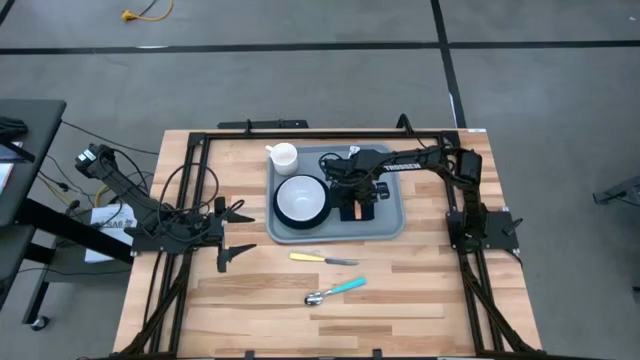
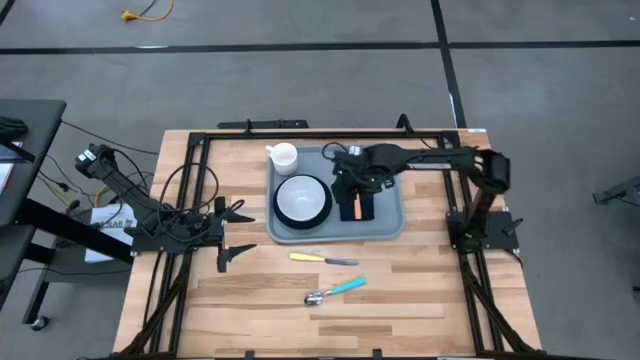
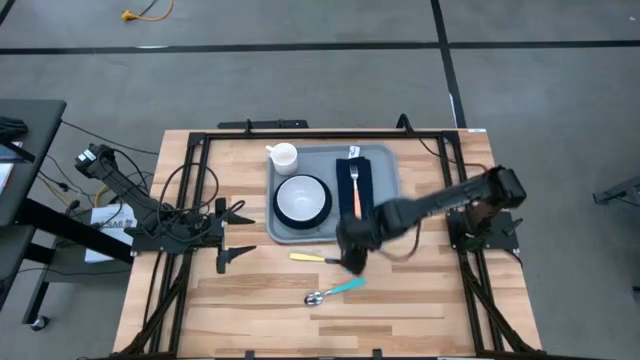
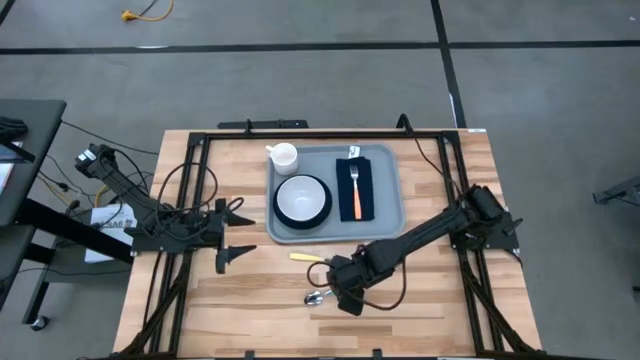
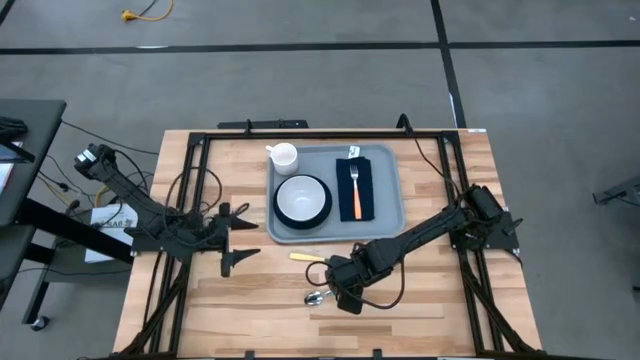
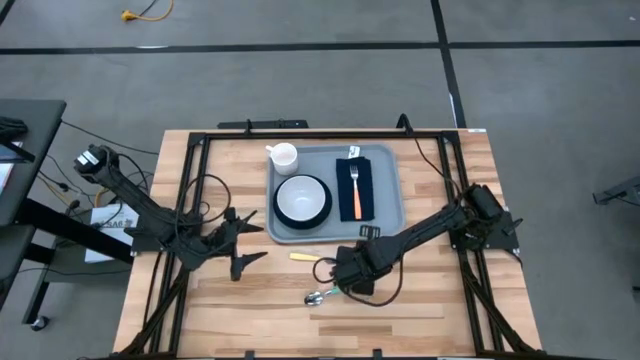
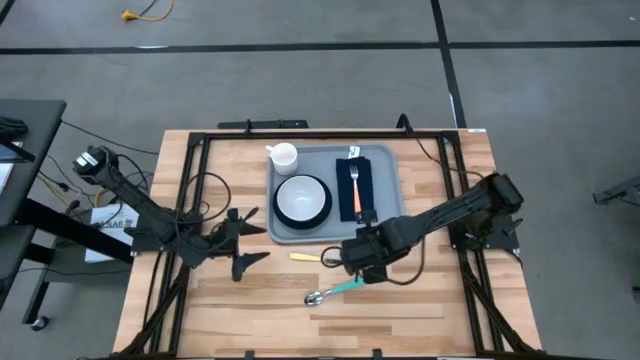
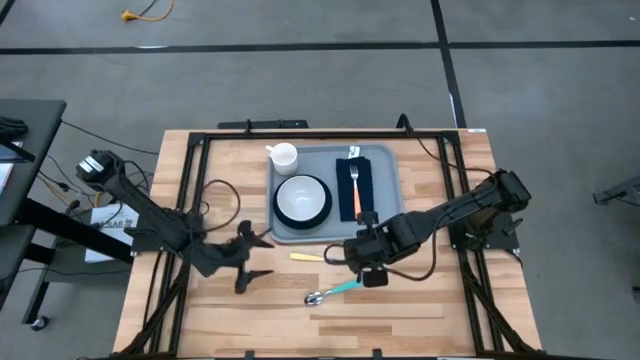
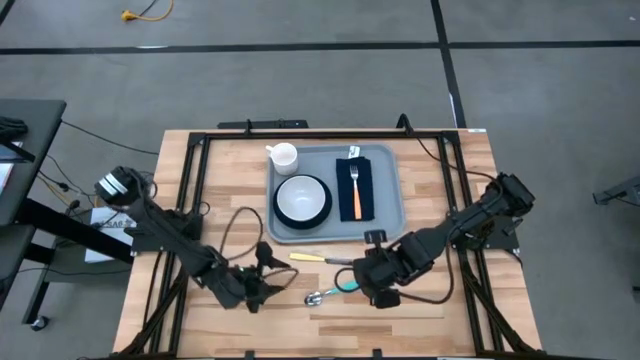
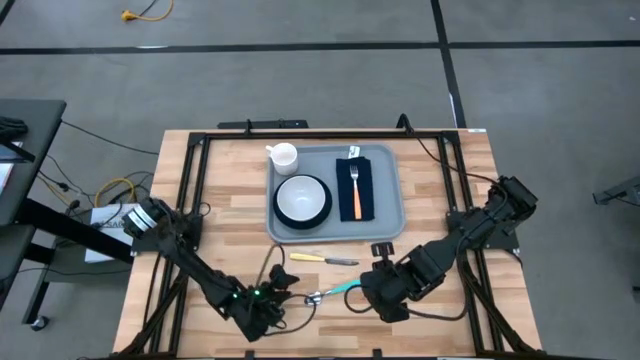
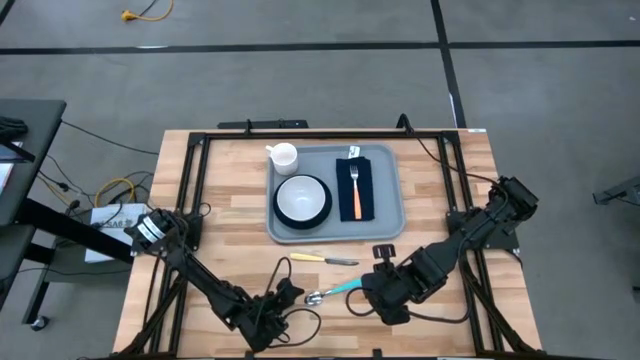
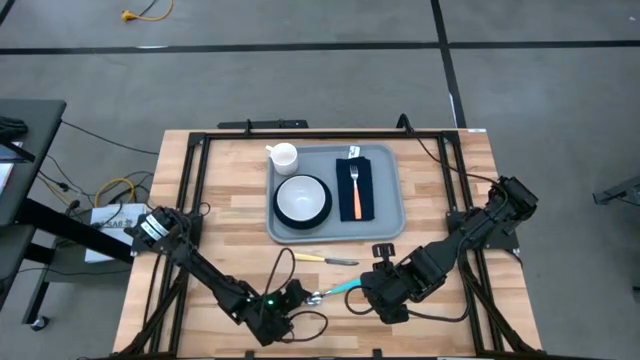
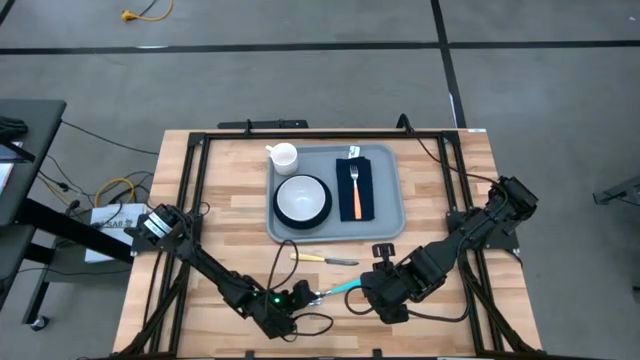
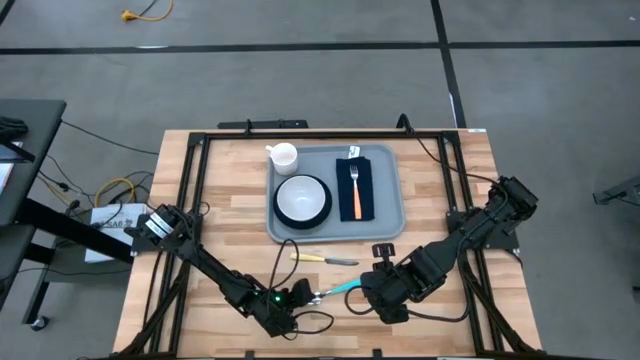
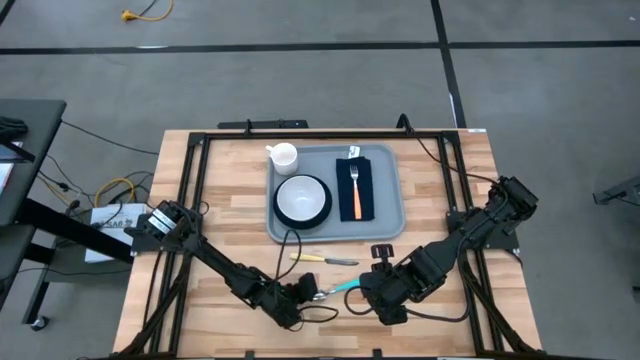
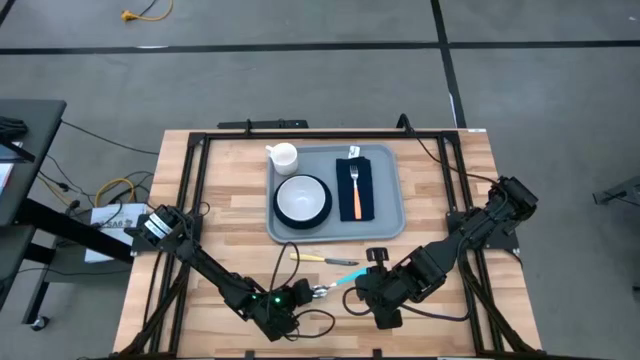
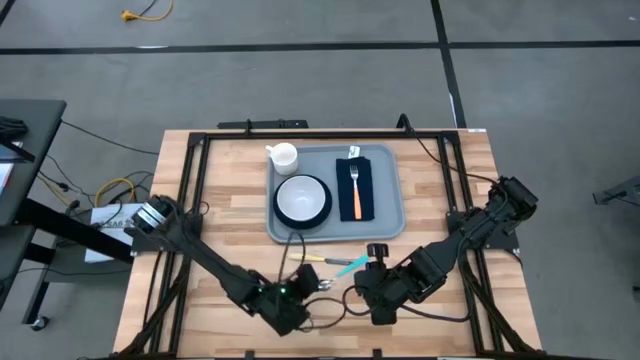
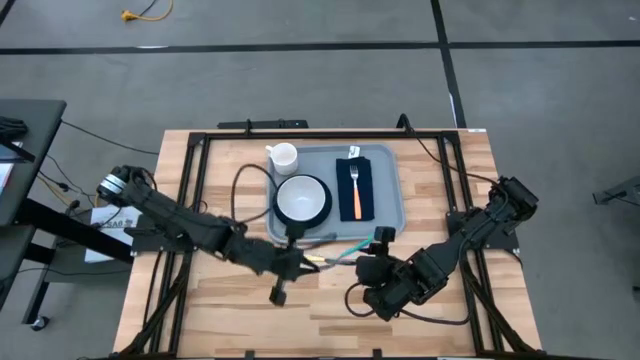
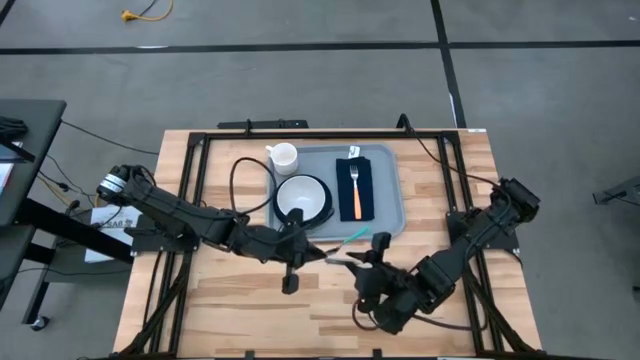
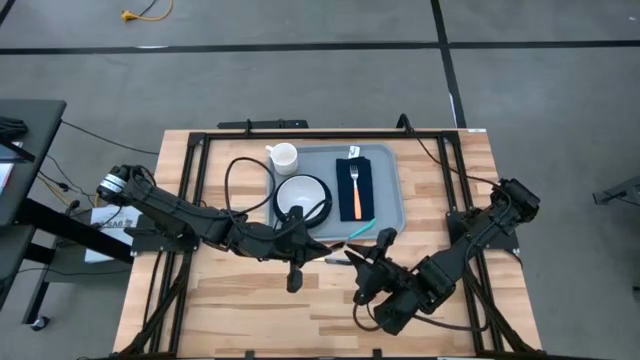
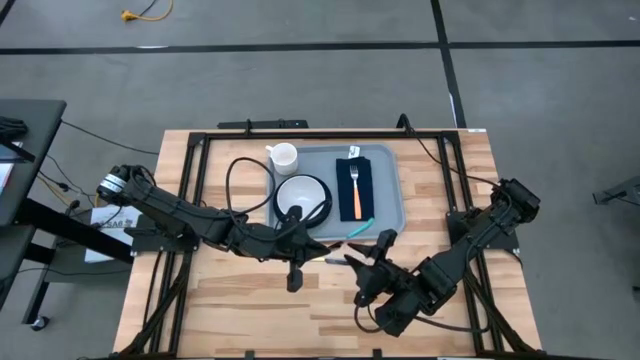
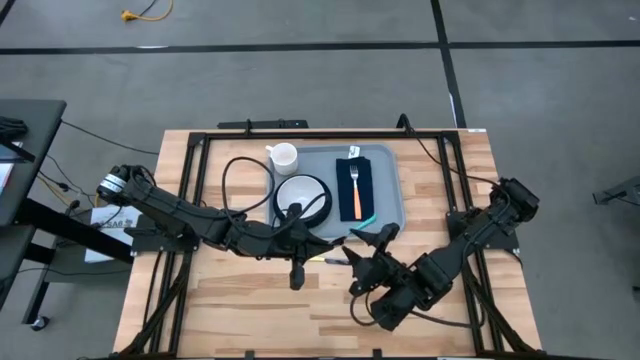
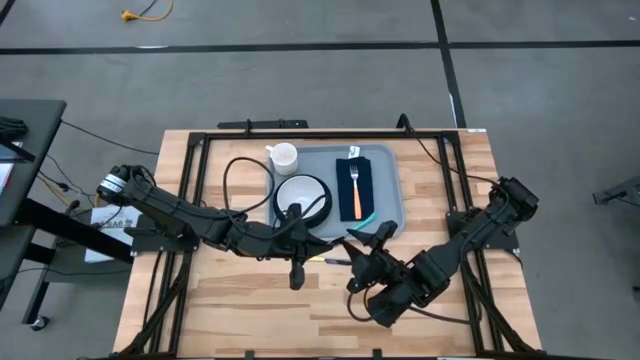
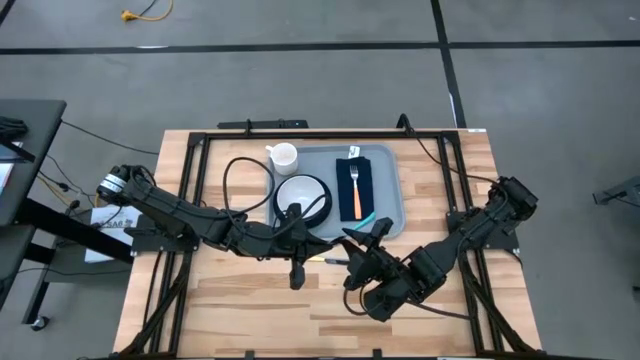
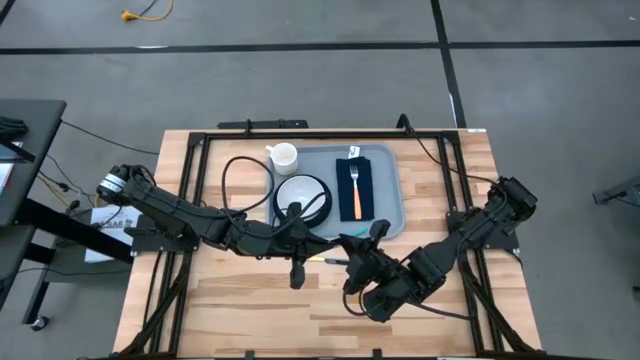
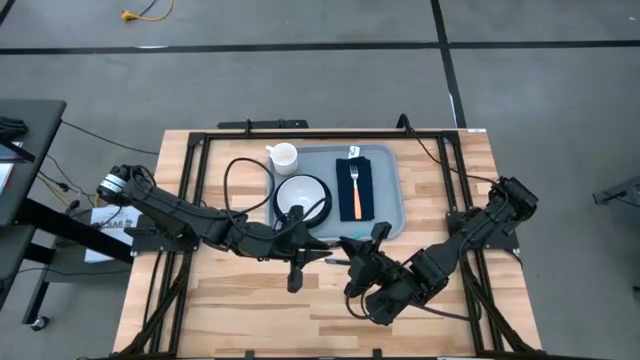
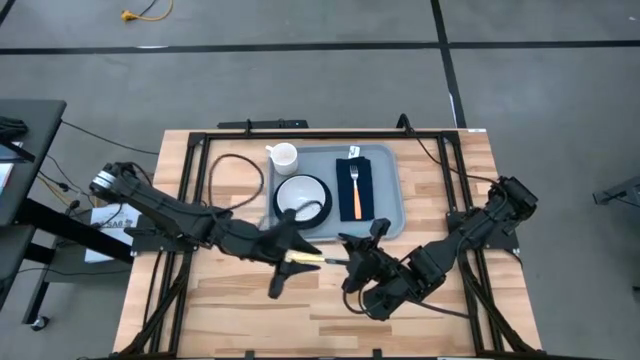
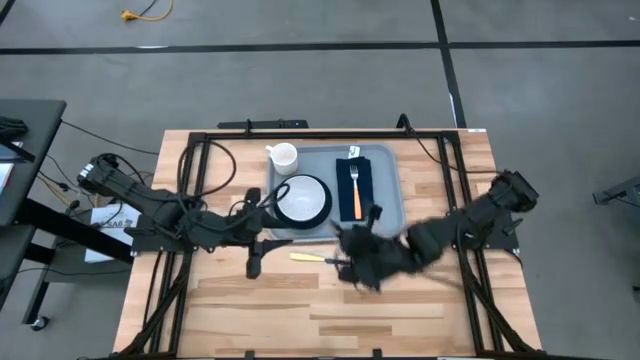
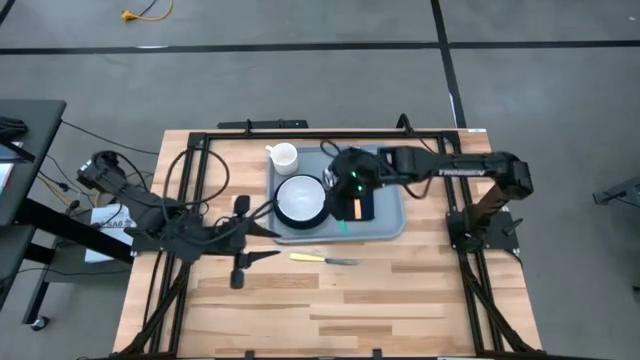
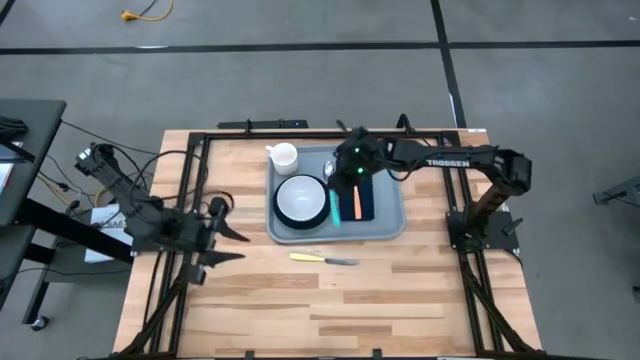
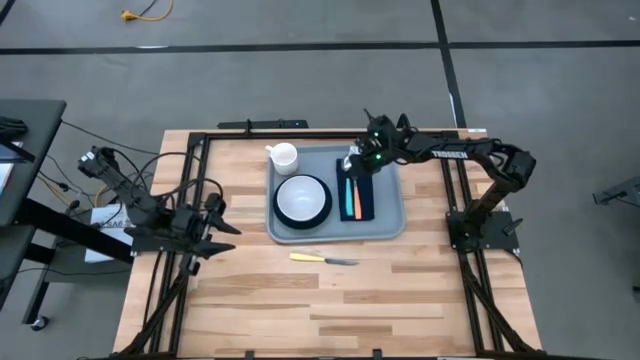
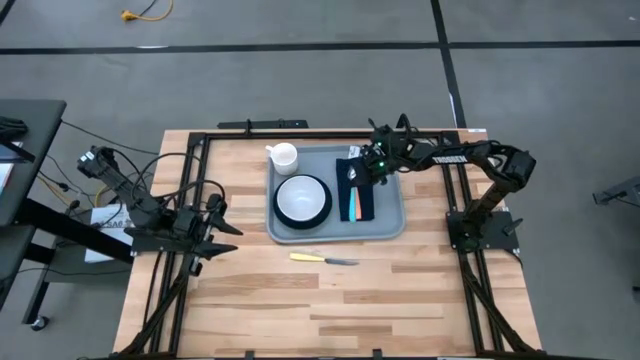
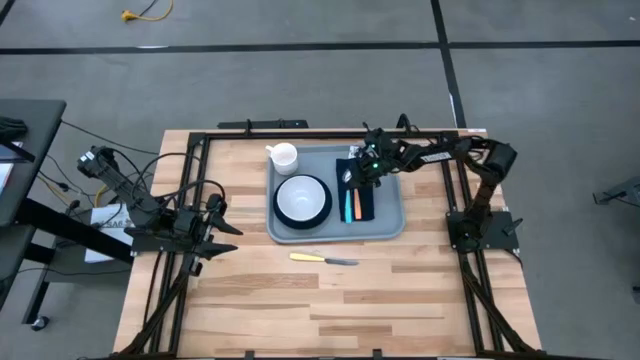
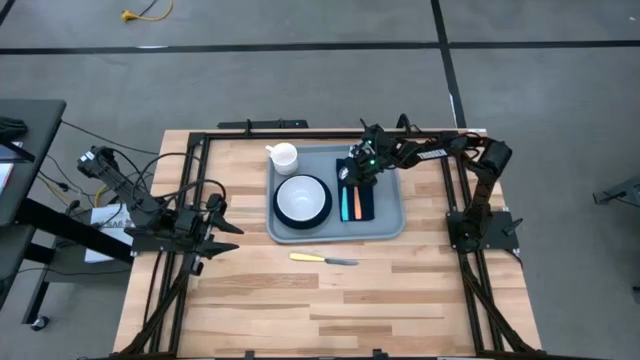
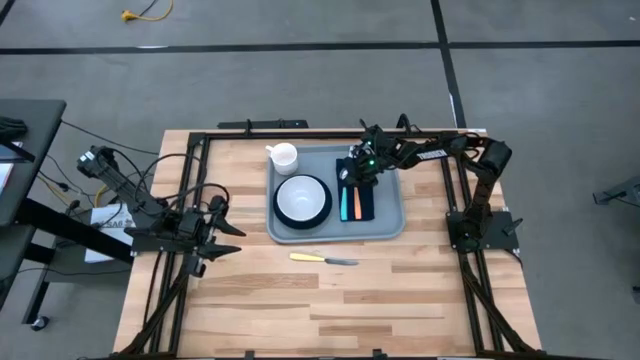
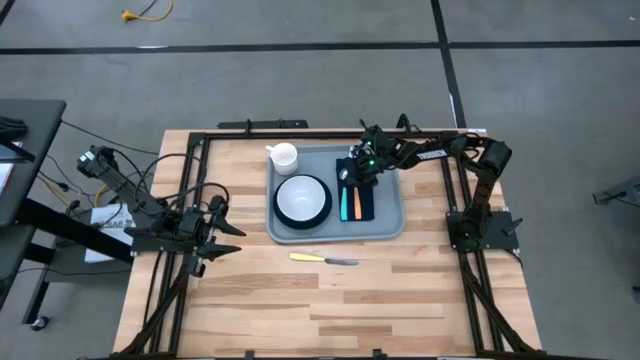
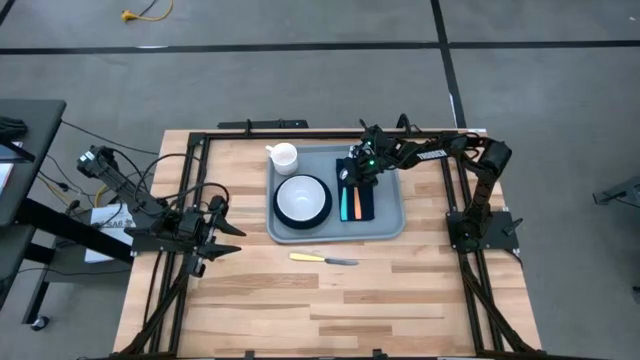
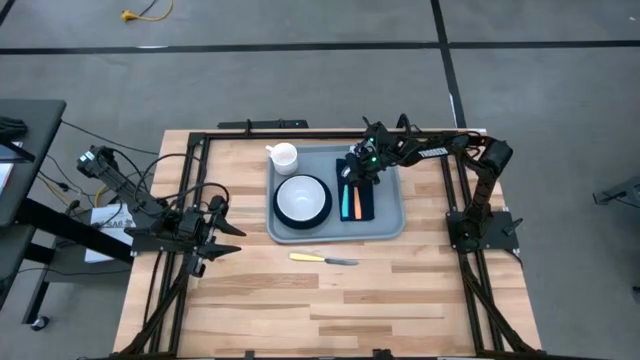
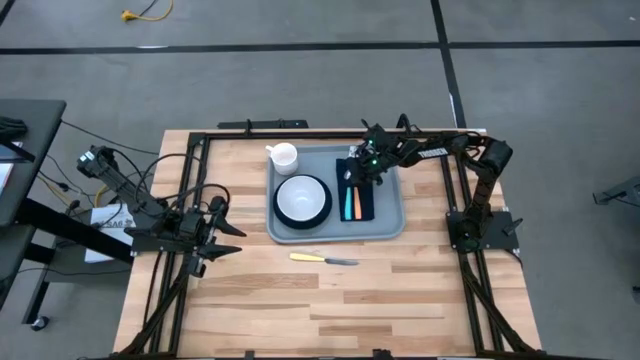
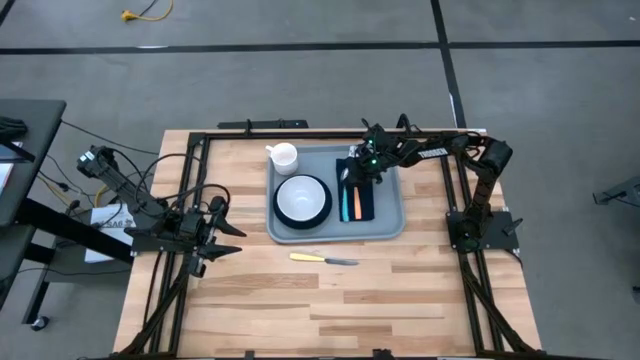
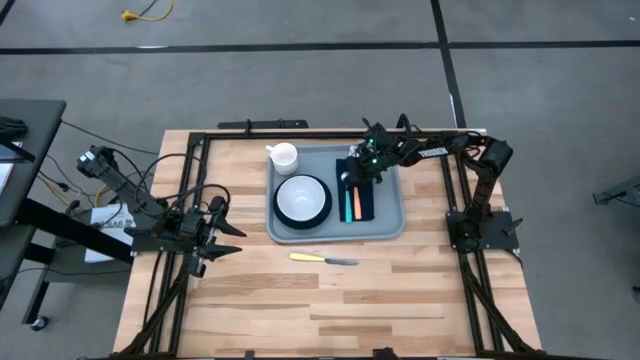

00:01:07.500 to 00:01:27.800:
Task: Set up tray
Put the green spoon on top of the black napkin on the gray tray
